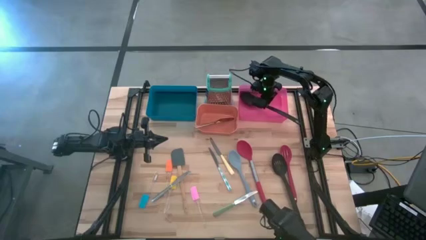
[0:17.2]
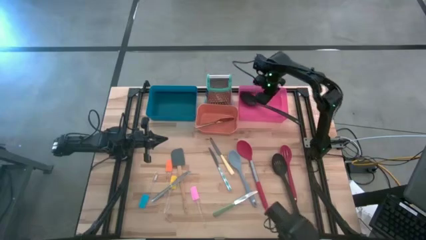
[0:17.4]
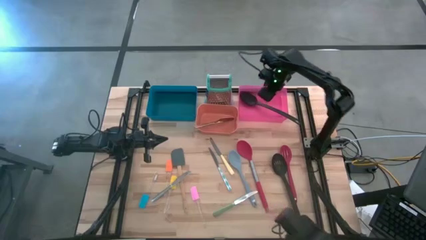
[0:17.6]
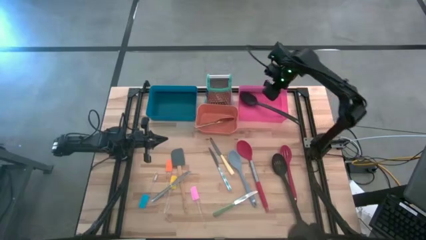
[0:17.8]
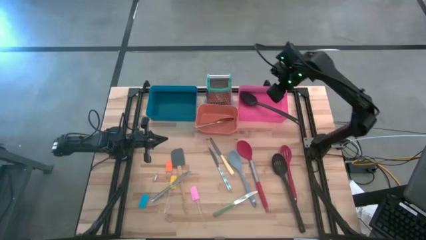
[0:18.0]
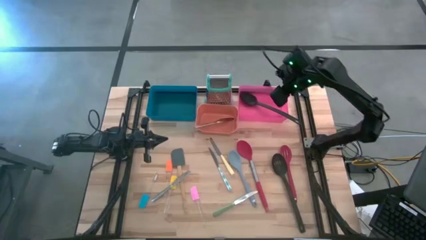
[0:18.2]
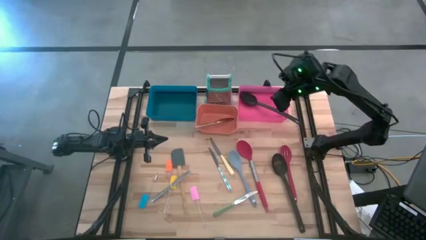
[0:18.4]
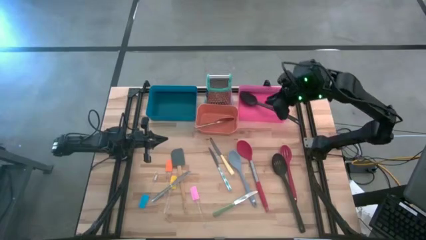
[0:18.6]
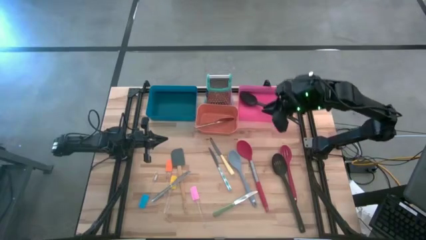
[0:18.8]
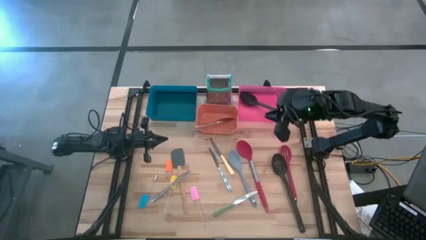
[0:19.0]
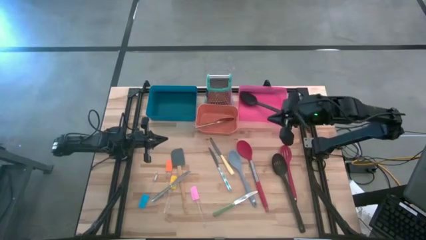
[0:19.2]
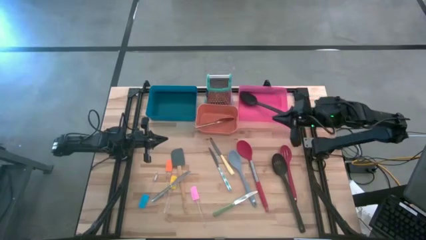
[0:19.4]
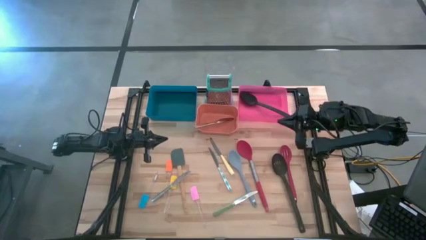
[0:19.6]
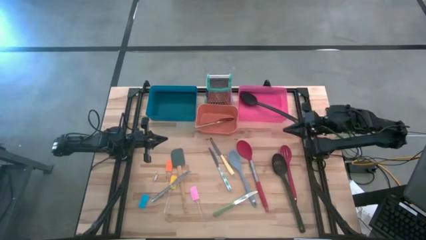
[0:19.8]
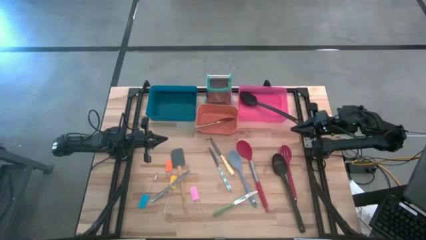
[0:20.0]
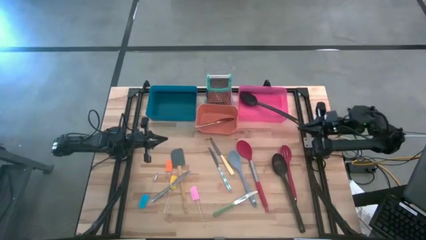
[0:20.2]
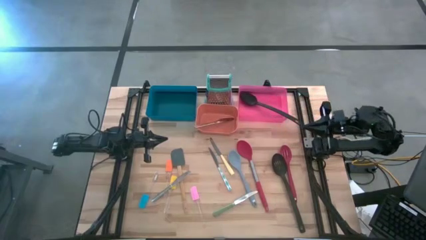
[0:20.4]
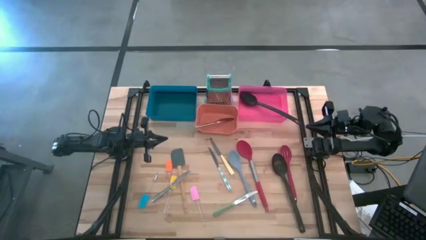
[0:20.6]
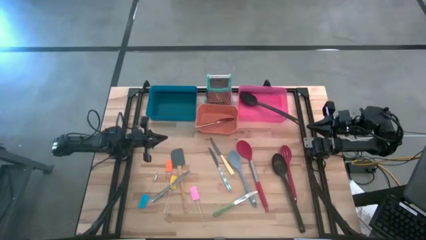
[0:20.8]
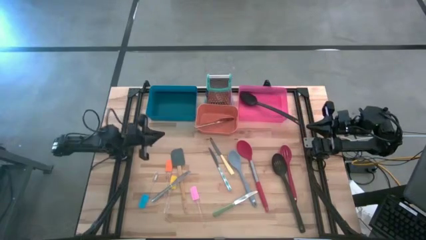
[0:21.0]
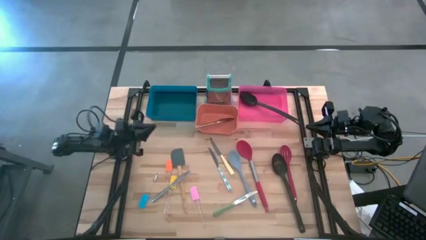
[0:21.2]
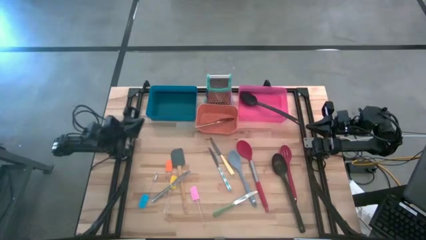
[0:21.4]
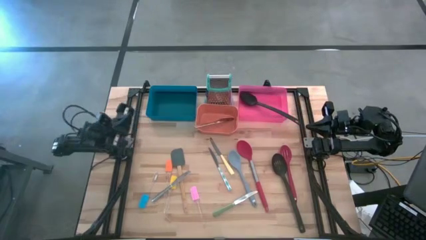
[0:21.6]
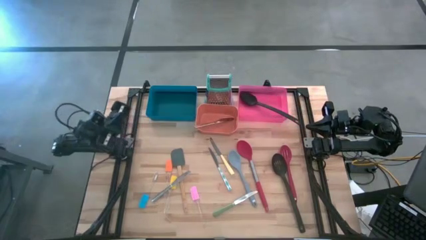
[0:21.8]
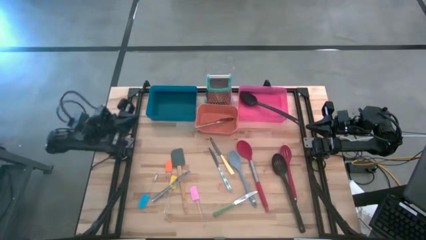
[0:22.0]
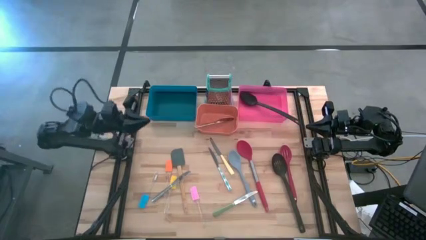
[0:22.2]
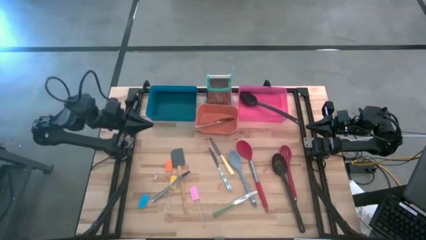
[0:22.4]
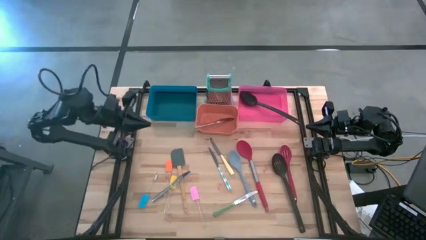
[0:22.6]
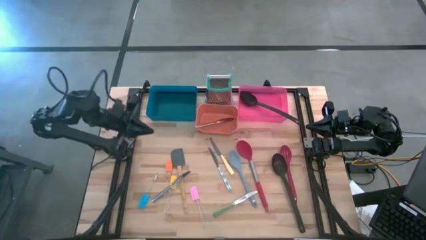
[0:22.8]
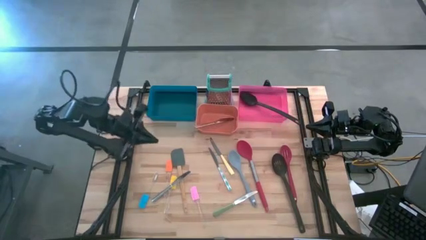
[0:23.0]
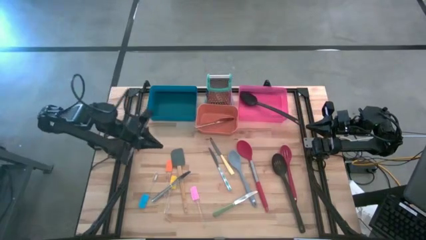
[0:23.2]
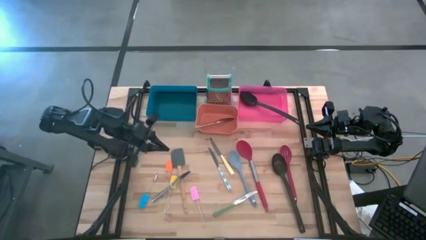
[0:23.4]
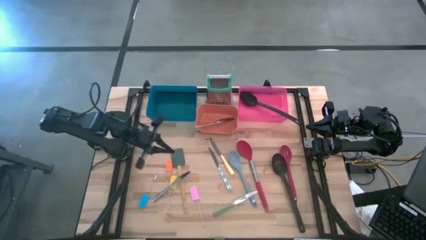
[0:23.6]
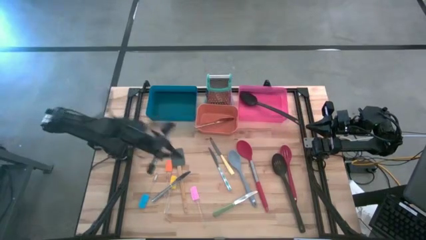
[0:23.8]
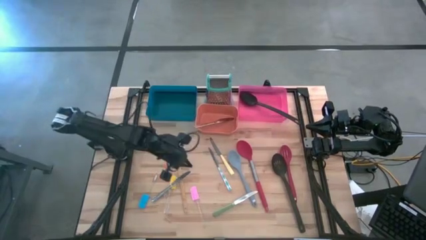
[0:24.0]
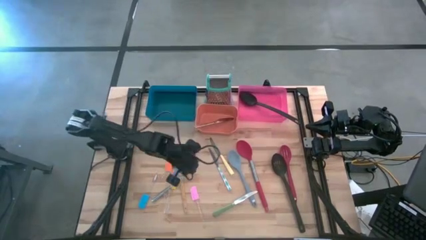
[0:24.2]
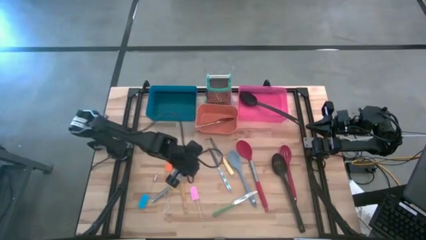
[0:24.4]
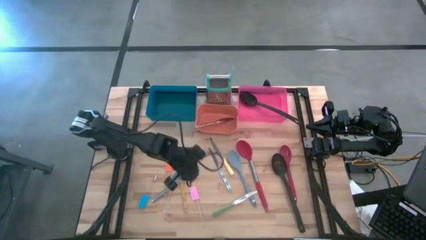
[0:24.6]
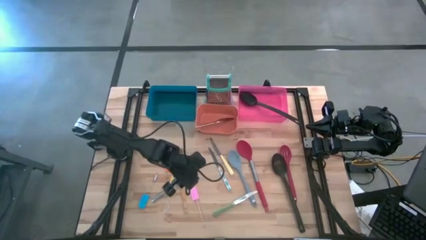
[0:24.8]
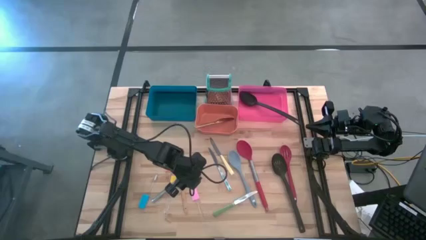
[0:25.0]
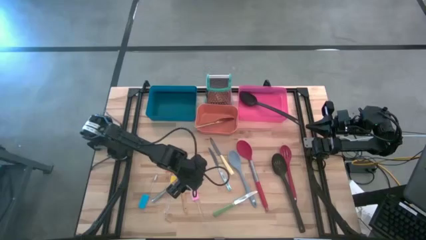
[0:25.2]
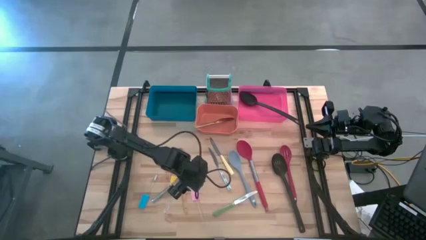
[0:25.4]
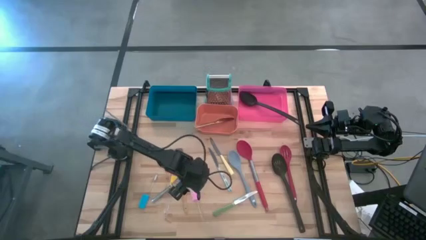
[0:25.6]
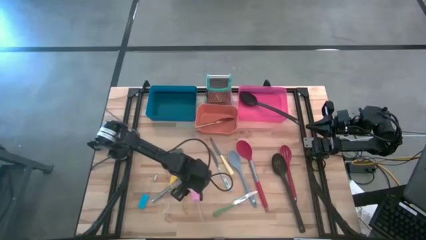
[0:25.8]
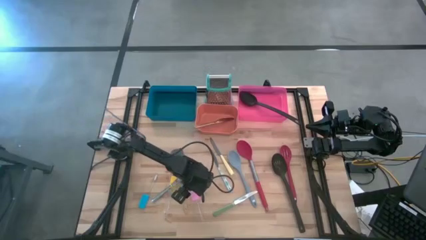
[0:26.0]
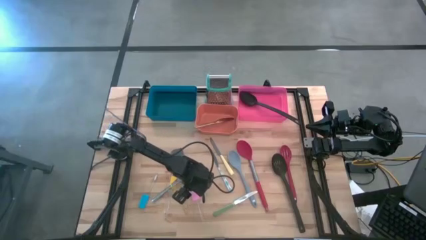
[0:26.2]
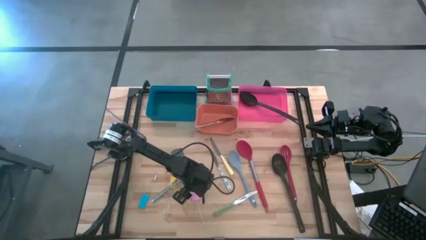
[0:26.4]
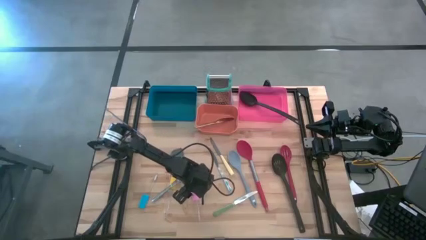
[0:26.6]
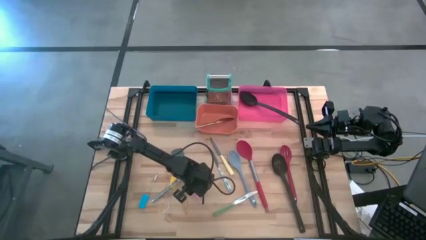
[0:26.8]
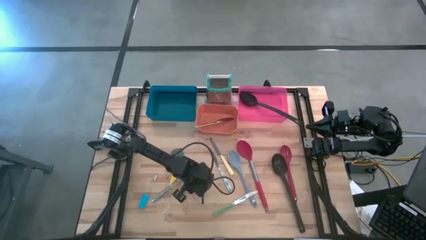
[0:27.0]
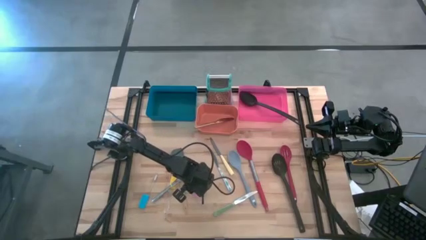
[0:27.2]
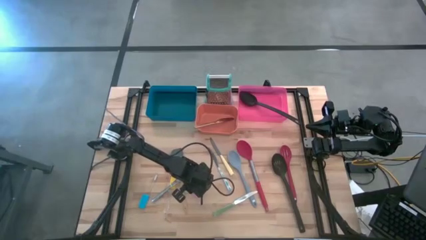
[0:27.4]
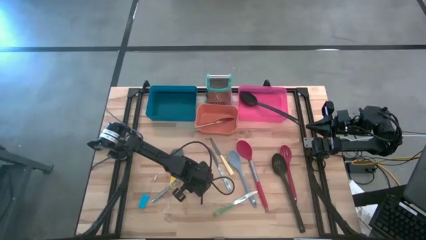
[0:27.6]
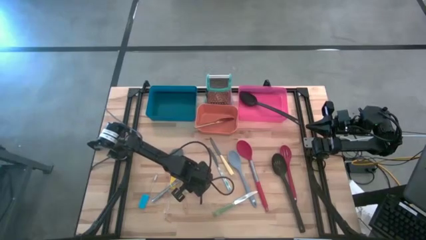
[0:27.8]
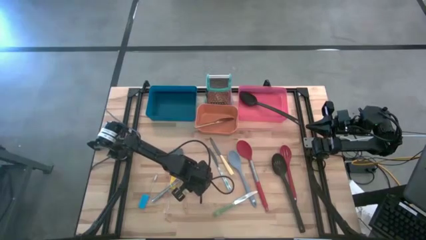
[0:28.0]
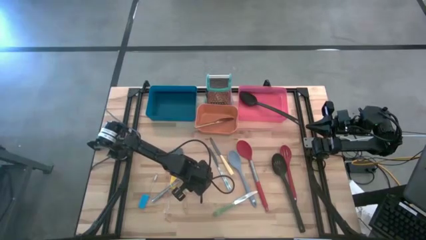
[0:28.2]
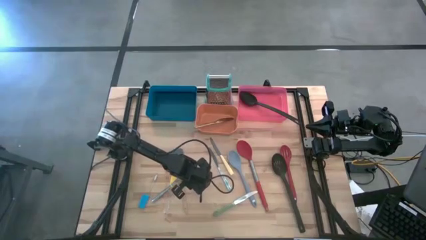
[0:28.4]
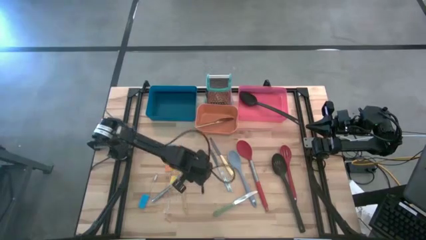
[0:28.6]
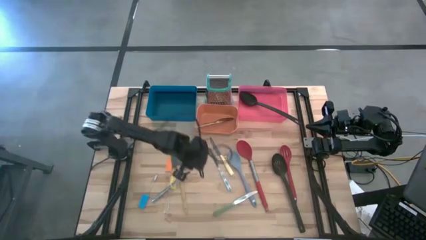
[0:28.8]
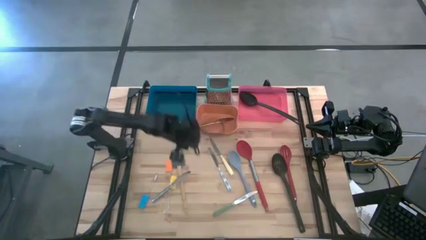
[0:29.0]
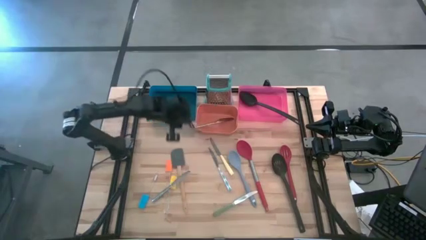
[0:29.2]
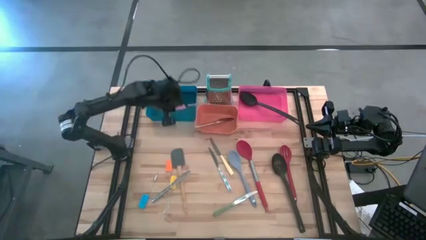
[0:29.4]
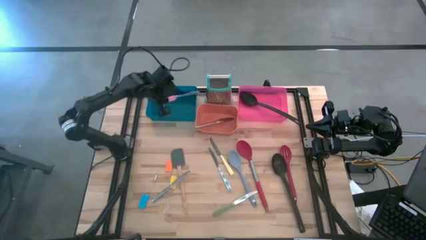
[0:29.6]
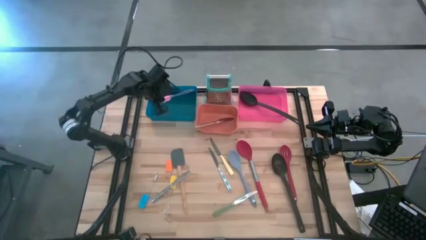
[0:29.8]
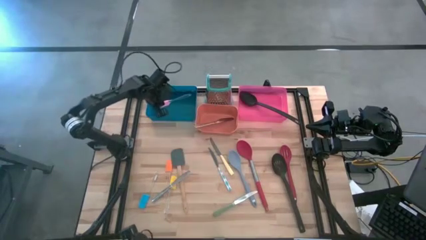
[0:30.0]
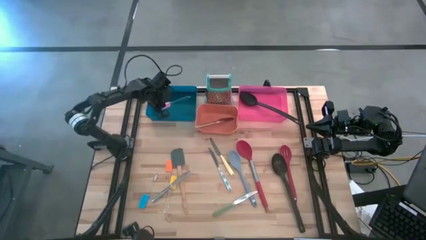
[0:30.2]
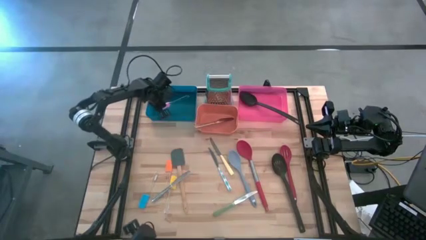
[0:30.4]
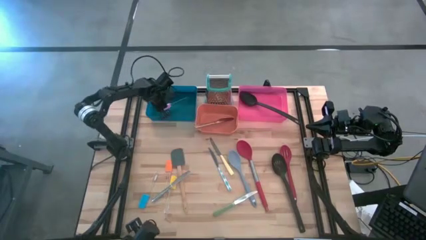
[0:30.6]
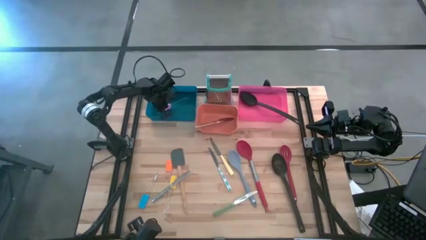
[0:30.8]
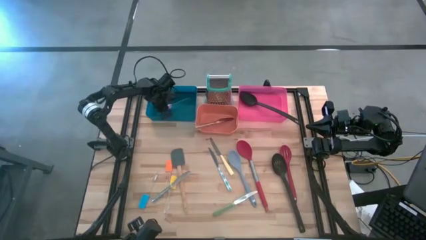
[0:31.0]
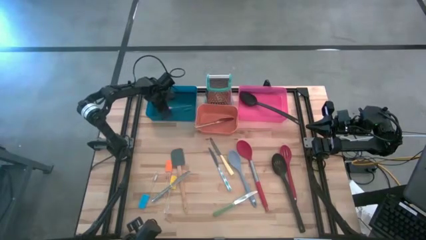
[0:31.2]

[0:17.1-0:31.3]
Task: Pick & Place Kitchen Items
Put the pink spatula into the blue bin

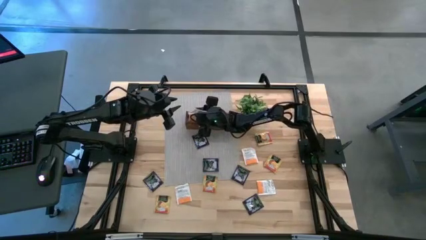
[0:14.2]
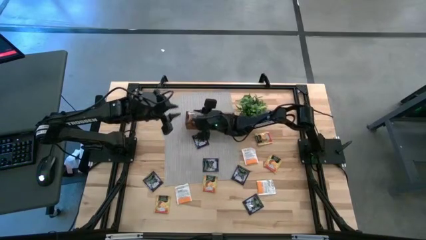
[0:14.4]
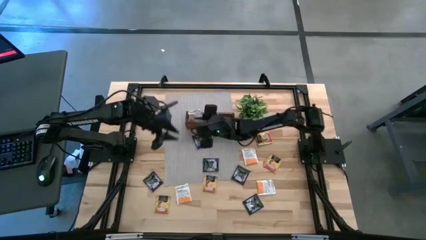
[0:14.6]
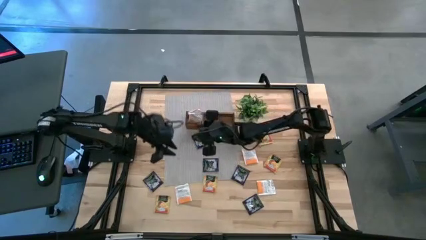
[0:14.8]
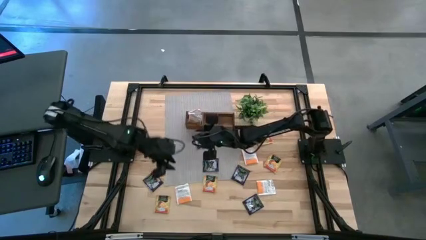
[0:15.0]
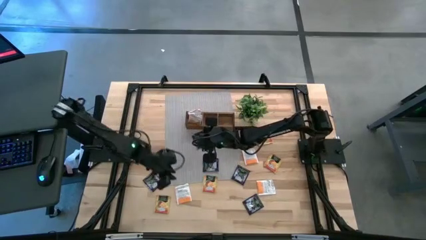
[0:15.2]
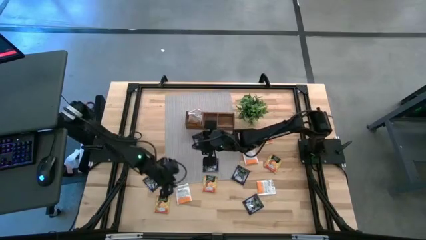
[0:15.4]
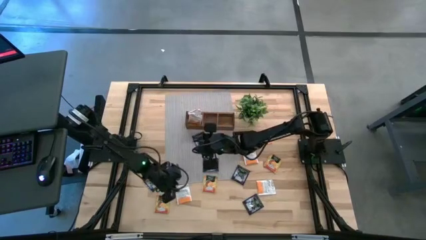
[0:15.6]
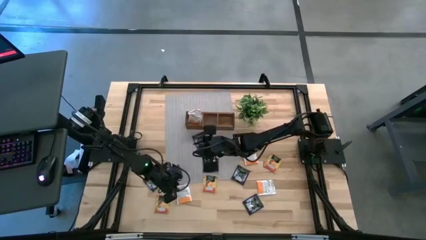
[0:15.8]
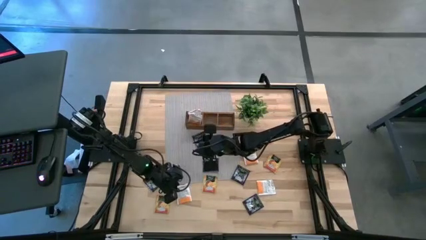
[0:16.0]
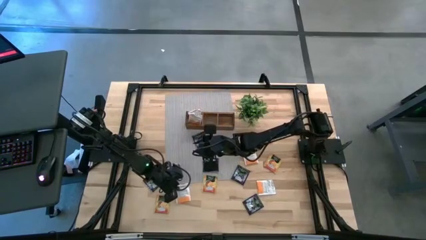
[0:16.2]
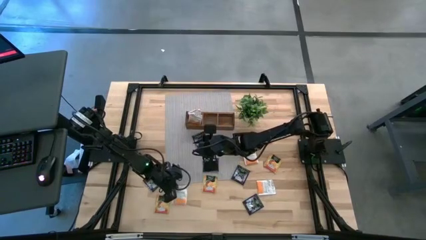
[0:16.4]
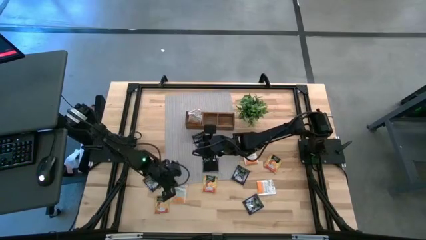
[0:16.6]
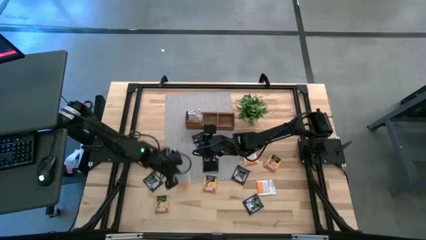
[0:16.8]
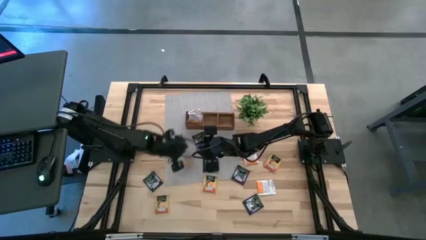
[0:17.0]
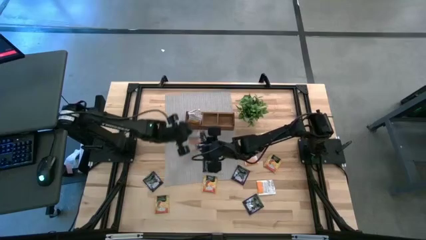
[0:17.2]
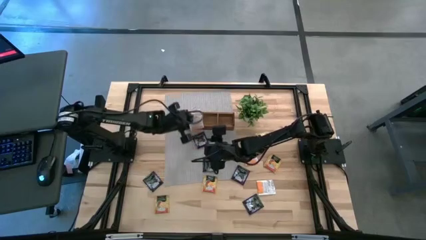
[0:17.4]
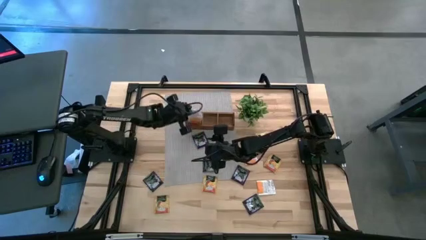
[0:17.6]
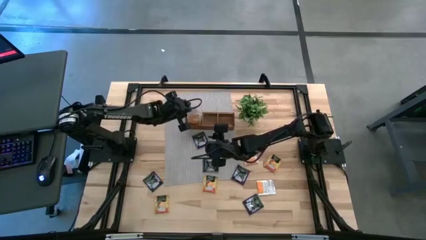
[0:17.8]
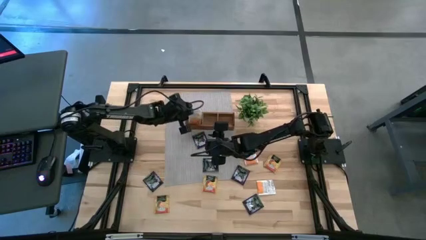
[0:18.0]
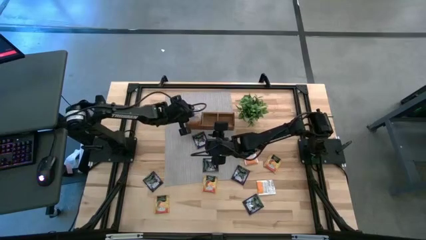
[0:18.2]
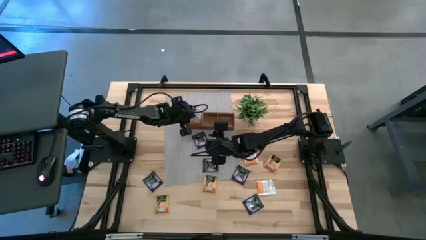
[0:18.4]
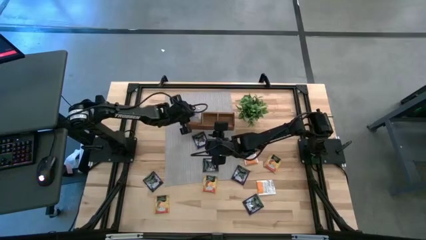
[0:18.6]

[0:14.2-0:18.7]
Task: Pick & Place Tea
Put the white tea bag in the left section of the brown wooden organizer
